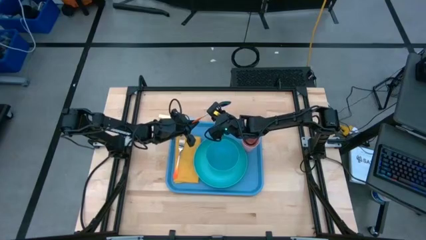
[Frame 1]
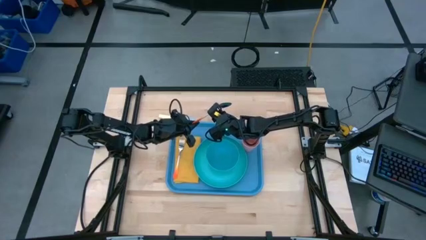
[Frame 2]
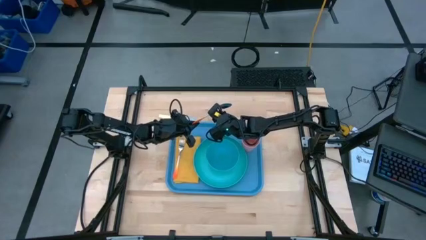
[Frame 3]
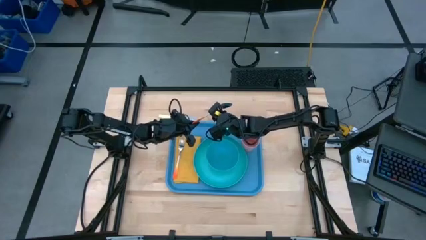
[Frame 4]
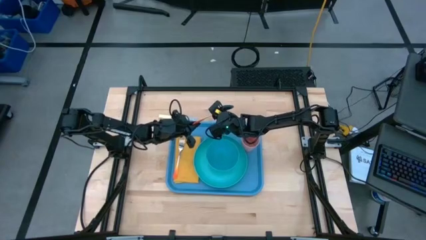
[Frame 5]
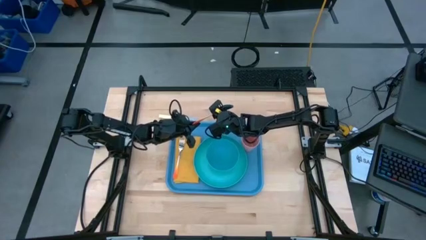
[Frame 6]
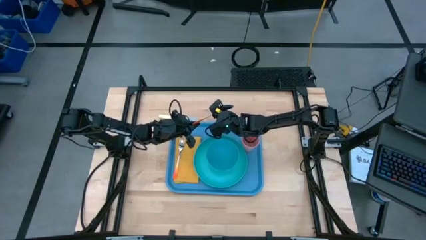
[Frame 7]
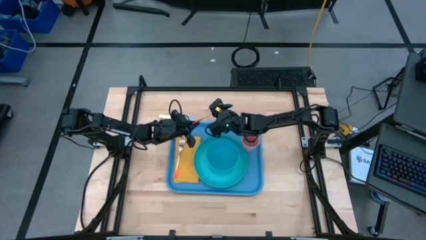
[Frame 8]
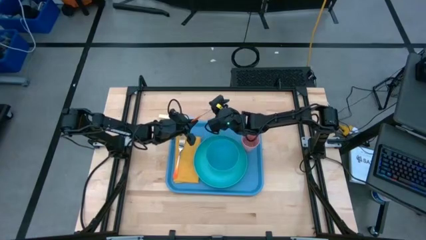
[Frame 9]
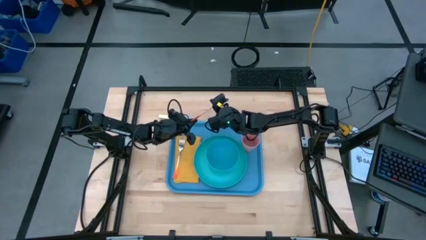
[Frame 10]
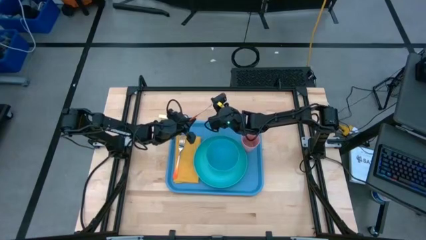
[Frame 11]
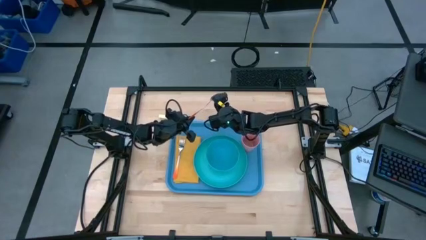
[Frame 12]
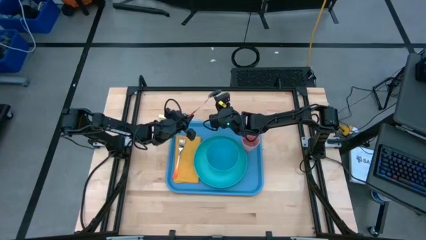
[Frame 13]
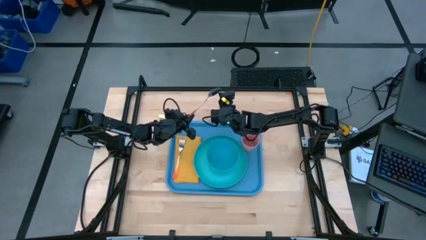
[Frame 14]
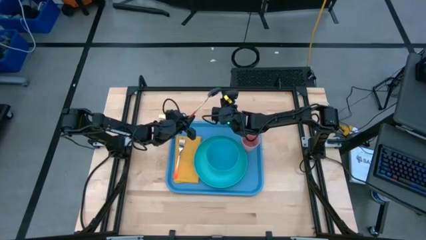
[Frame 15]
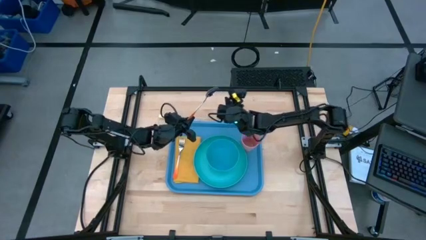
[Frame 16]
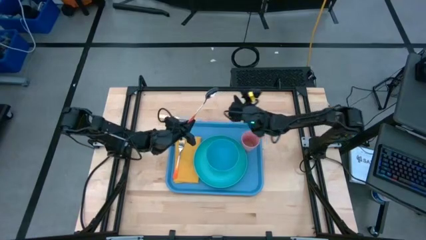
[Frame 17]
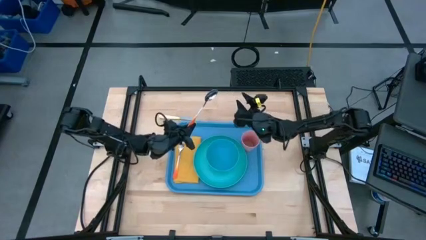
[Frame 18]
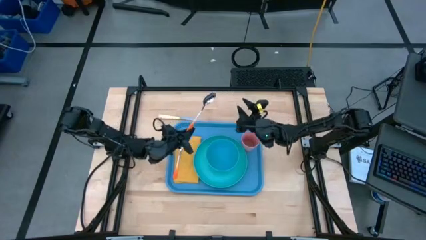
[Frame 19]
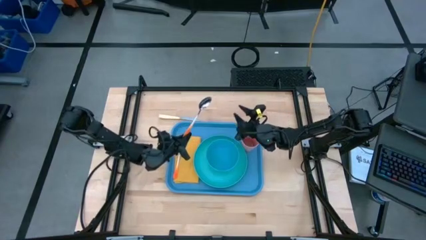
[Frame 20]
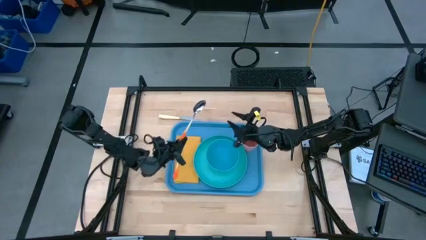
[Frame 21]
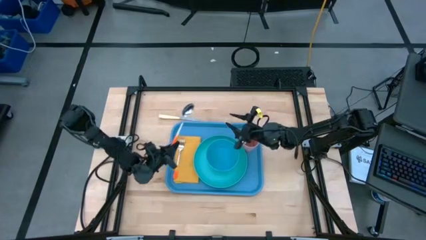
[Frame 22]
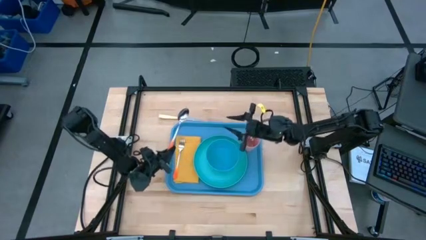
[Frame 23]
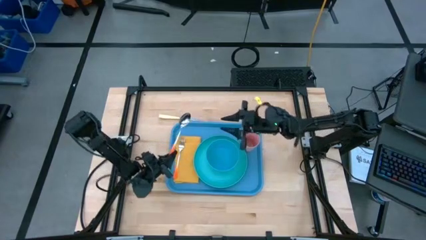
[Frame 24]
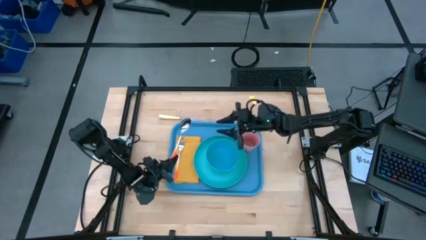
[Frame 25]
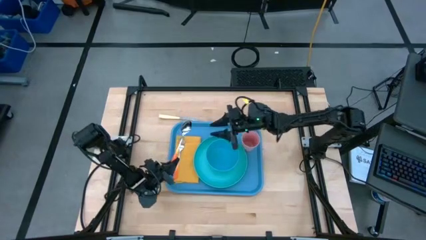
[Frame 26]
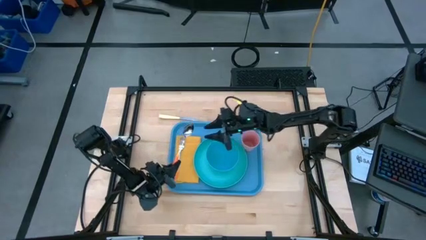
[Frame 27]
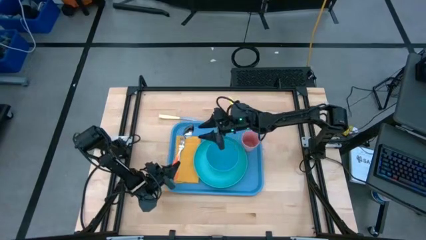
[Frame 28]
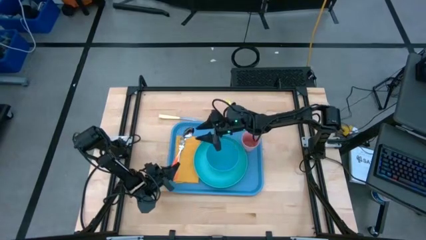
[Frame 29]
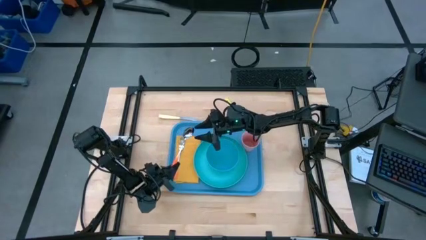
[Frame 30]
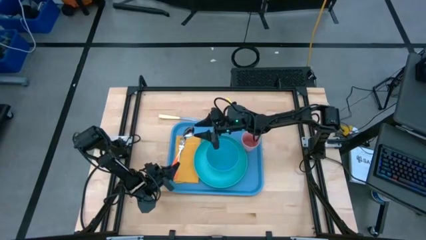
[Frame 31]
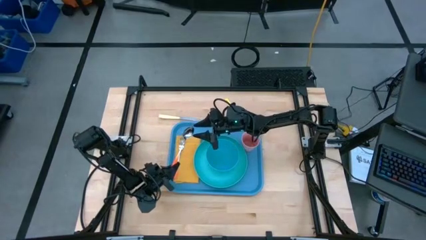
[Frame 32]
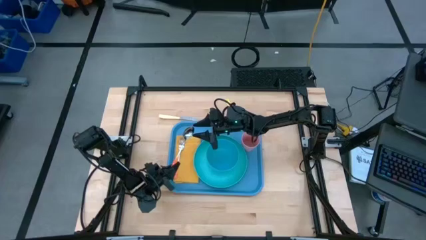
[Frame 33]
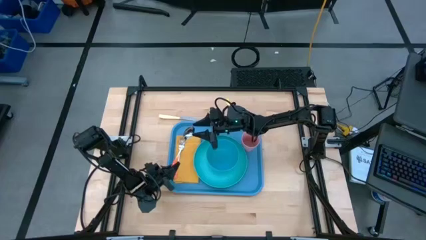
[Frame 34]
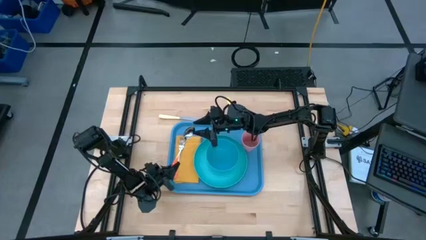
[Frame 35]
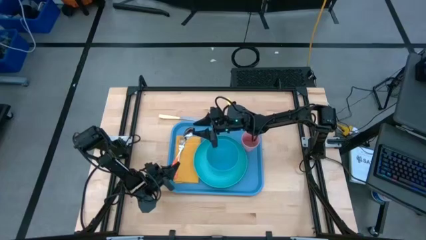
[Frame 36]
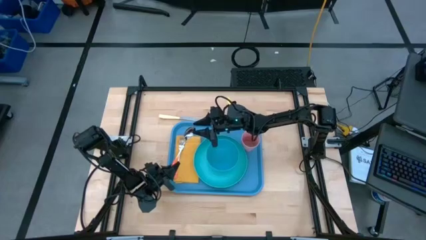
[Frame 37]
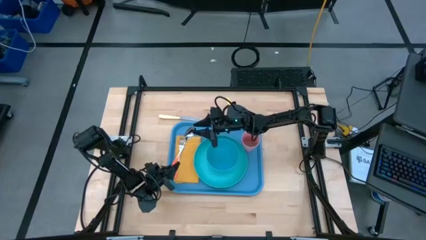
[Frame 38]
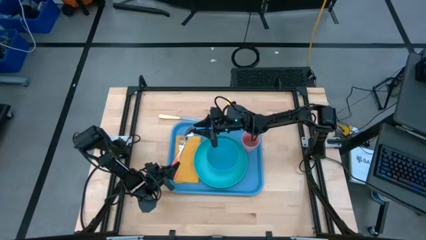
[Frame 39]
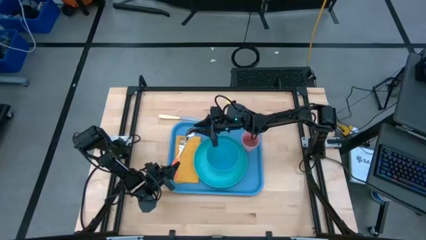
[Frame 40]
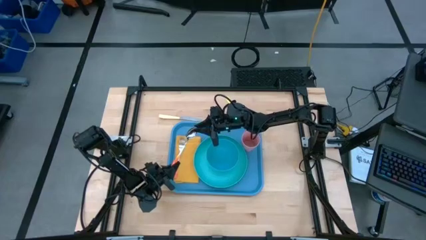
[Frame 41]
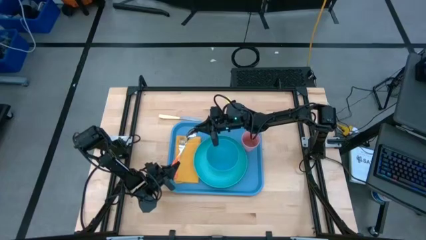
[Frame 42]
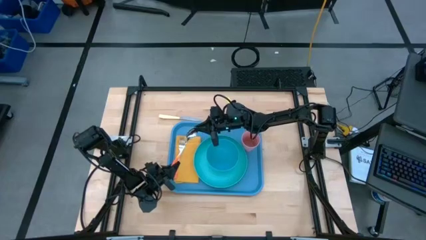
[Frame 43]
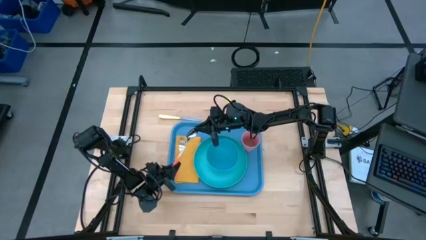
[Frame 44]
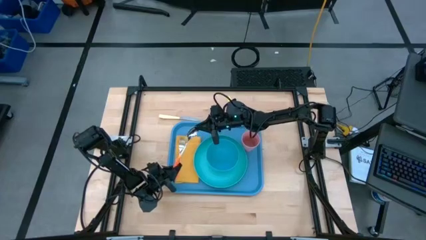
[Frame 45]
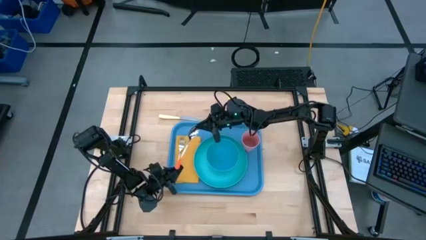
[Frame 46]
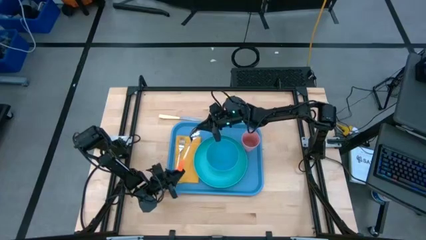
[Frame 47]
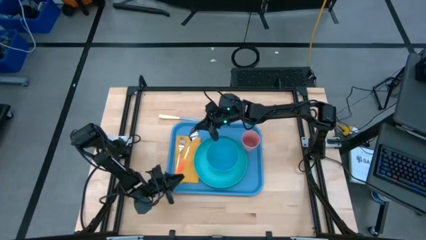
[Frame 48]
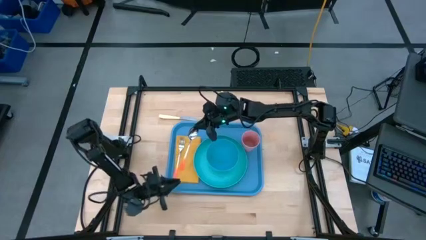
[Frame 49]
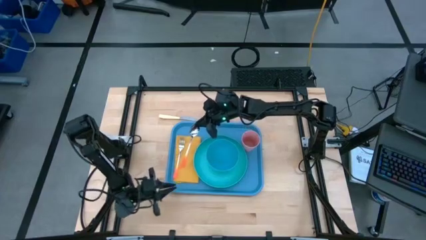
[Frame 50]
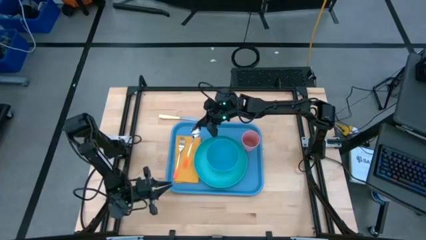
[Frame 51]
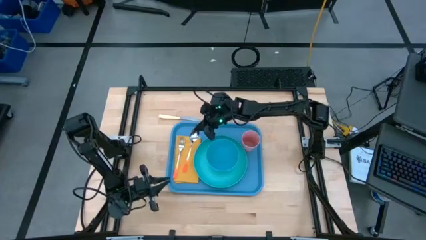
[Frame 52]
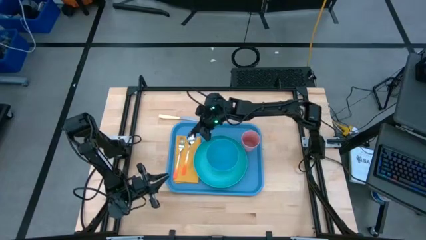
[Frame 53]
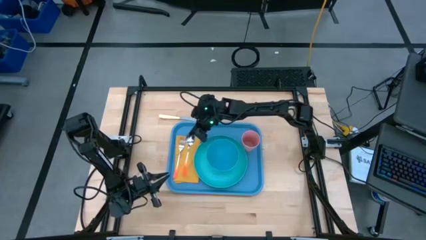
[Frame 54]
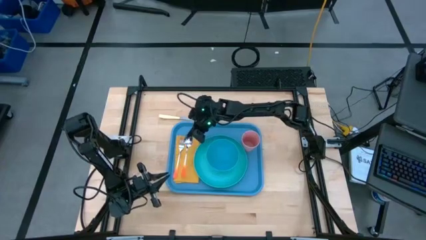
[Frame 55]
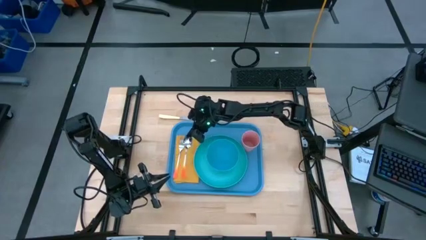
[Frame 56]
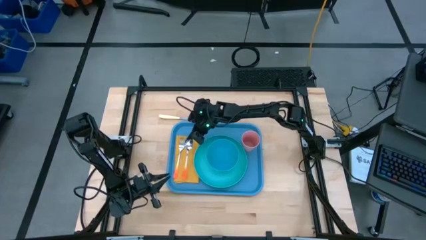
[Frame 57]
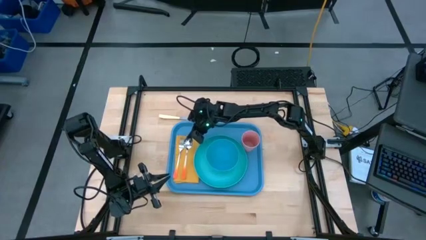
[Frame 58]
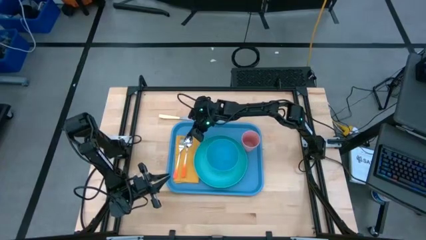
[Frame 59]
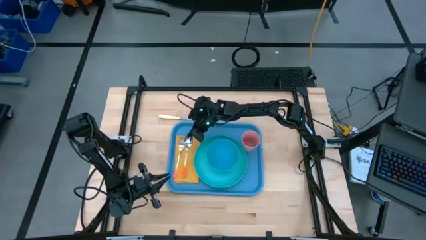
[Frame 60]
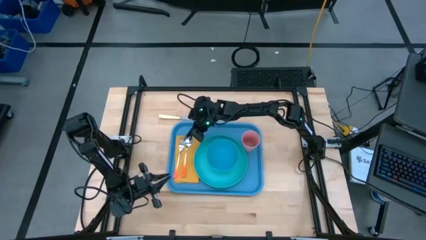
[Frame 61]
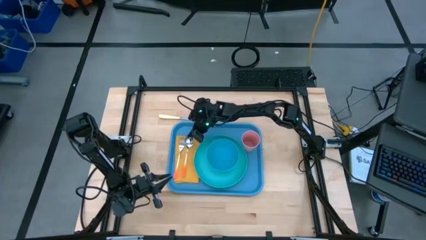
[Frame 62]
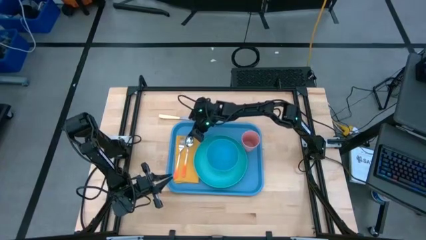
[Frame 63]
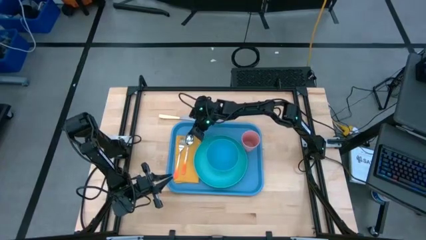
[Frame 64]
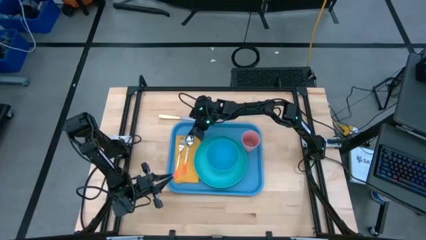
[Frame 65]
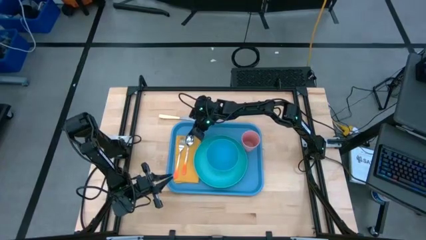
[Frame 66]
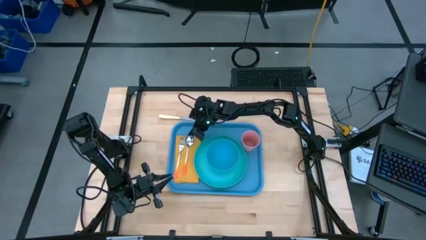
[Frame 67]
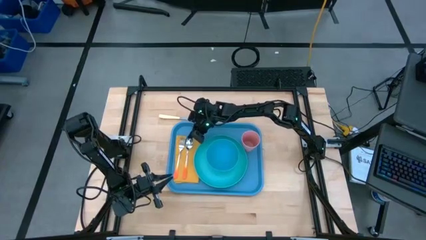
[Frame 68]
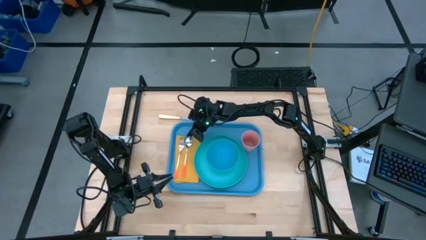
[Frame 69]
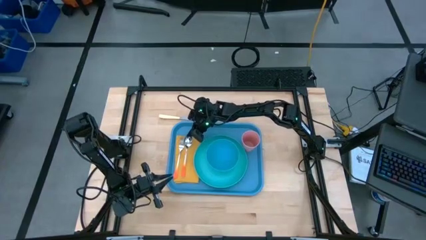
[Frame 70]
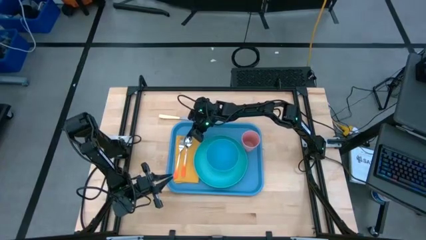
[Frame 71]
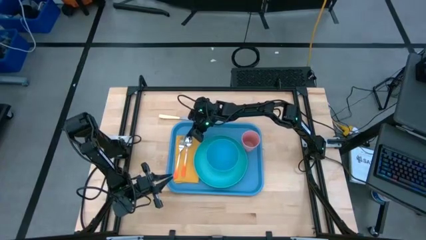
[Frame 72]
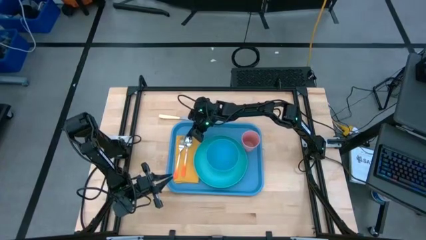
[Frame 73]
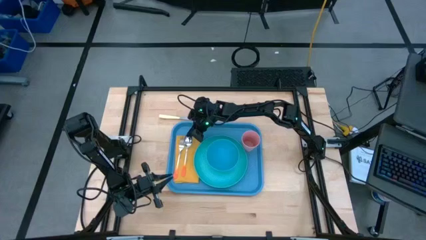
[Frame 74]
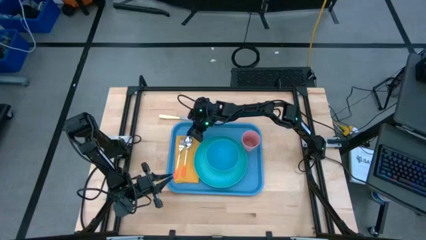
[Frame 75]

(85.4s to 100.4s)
Task: Set up tray
Put the orange spoon on the yellow napkin

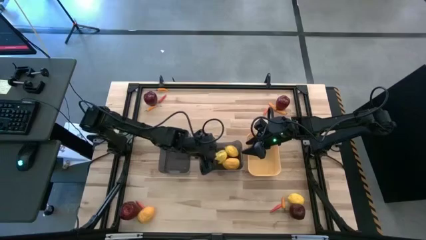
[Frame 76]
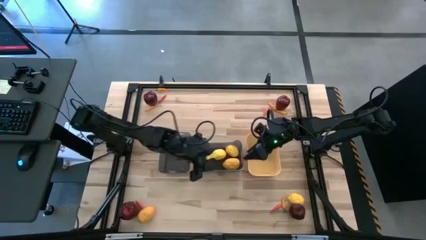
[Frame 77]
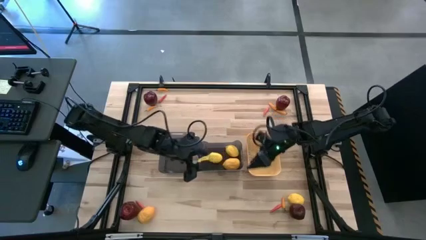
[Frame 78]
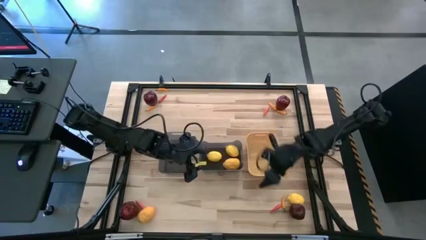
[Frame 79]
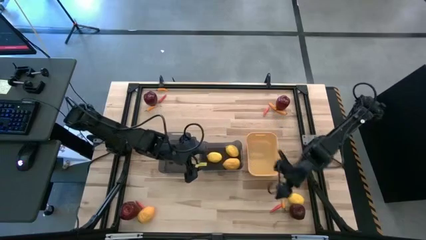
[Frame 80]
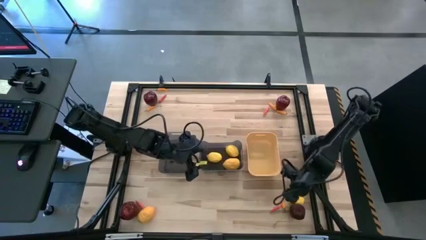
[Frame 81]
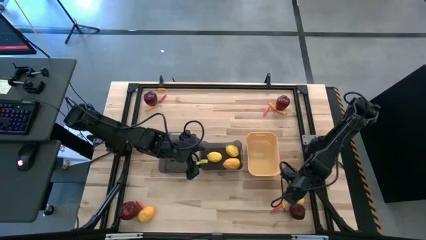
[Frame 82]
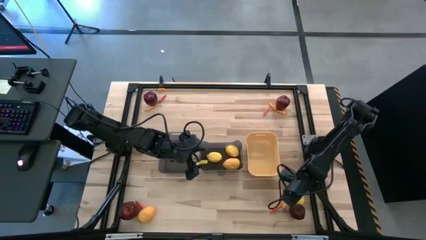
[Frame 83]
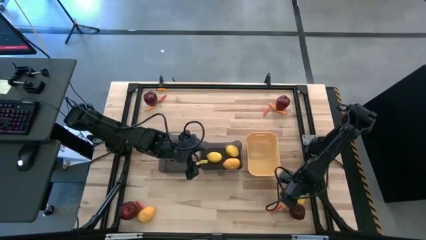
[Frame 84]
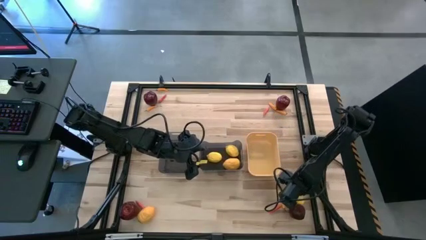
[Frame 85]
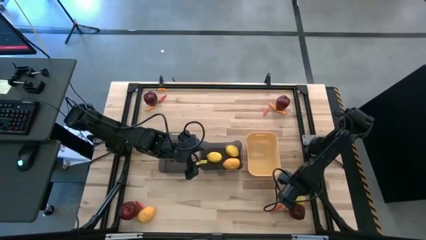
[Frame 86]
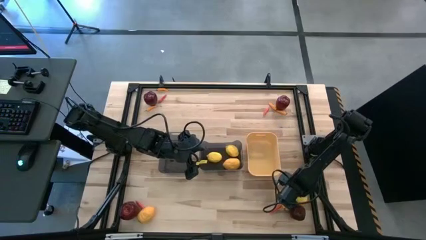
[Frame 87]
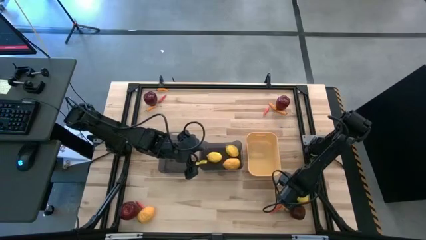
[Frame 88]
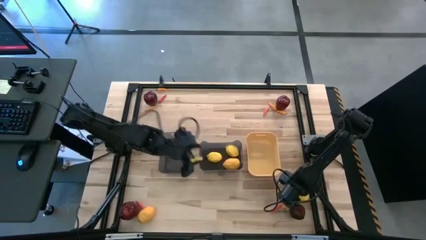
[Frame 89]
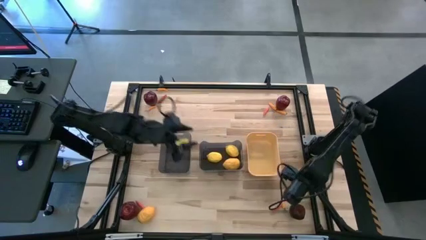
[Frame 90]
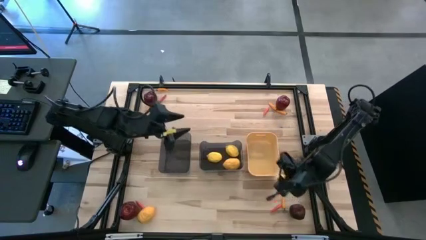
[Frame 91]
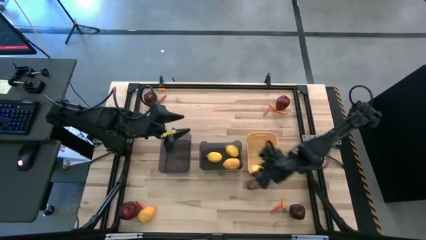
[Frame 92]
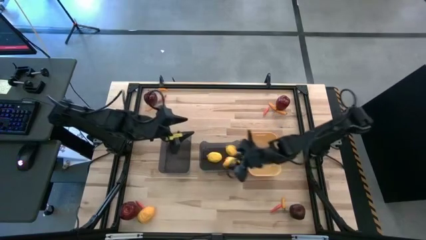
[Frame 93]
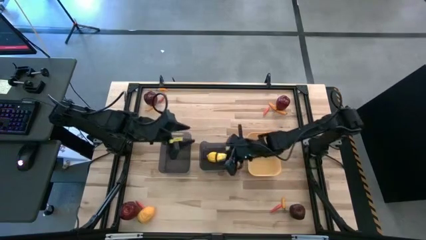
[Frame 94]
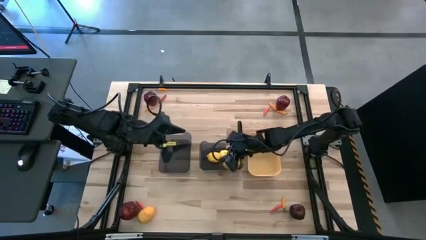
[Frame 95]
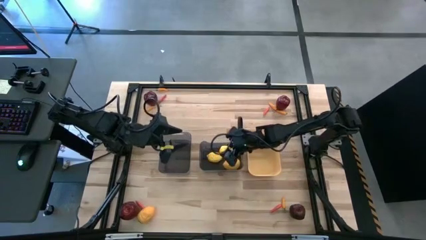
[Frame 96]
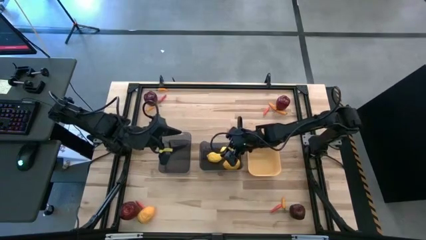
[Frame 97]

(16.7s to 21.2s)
Task: Sort produce into baskets
Put the lemon into the right black bin
